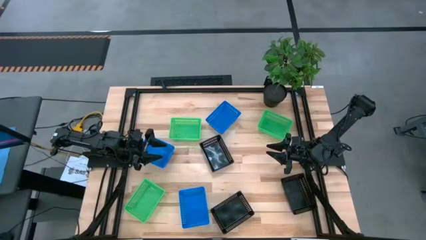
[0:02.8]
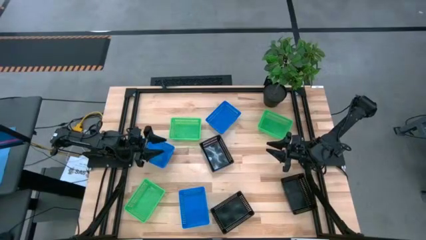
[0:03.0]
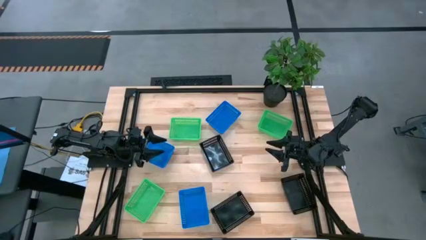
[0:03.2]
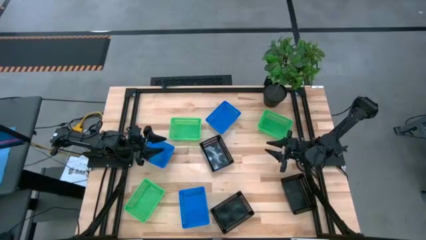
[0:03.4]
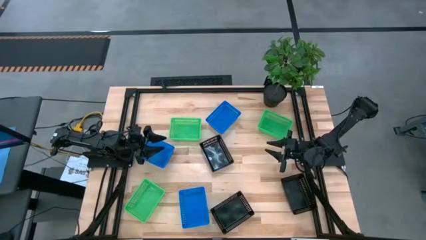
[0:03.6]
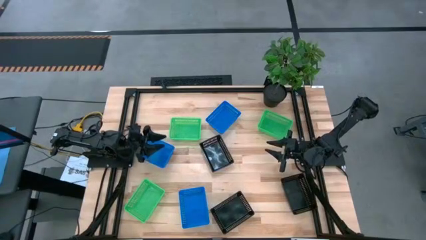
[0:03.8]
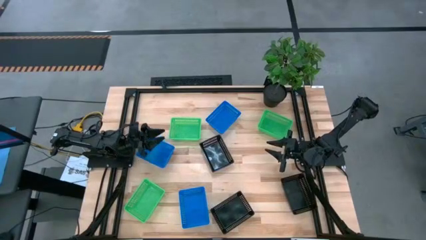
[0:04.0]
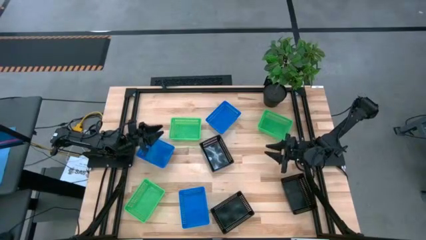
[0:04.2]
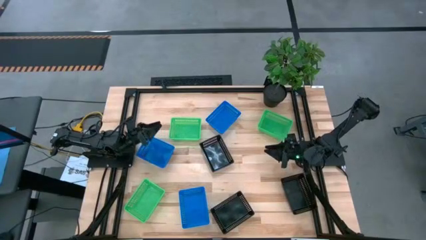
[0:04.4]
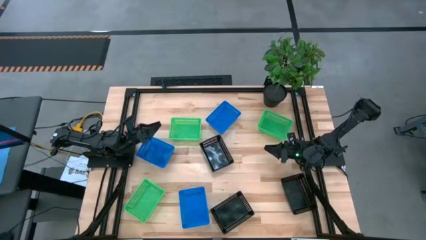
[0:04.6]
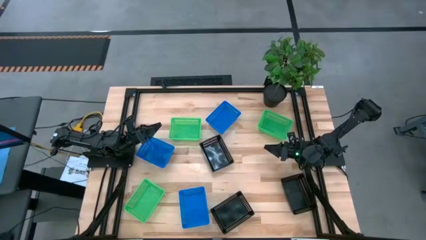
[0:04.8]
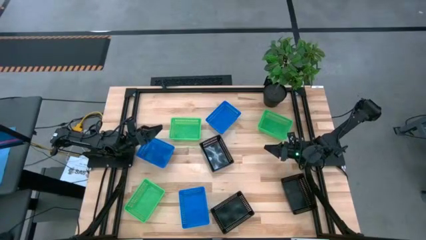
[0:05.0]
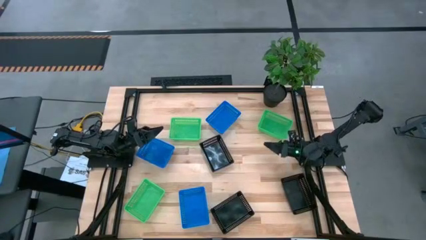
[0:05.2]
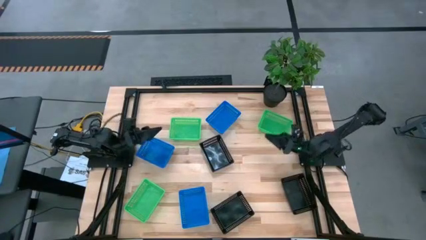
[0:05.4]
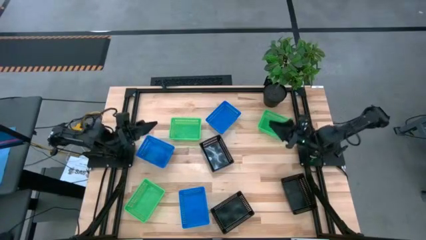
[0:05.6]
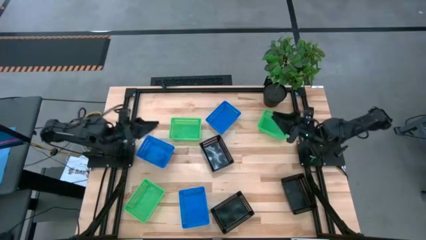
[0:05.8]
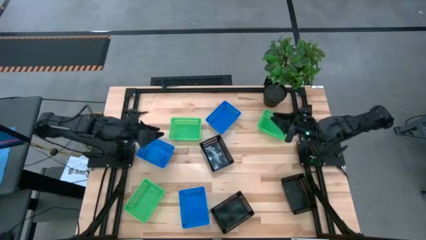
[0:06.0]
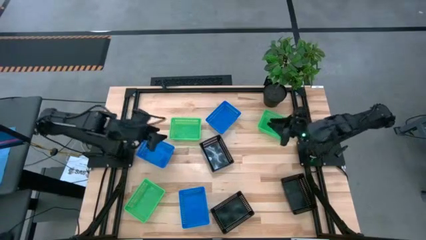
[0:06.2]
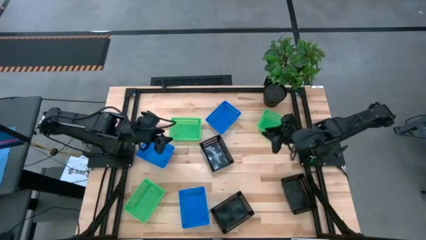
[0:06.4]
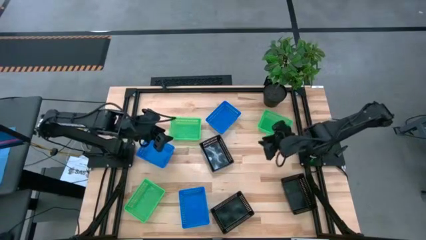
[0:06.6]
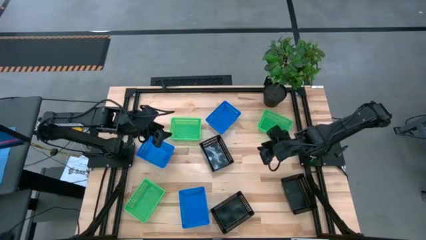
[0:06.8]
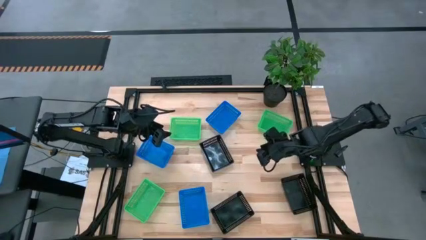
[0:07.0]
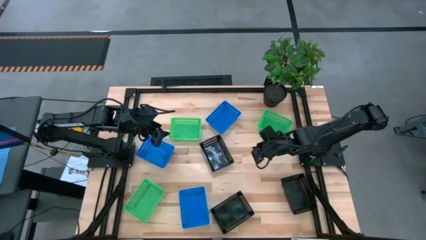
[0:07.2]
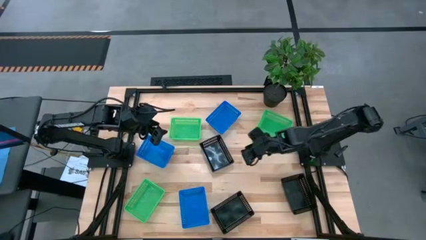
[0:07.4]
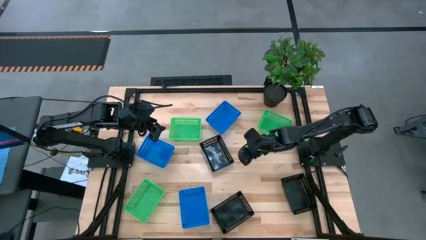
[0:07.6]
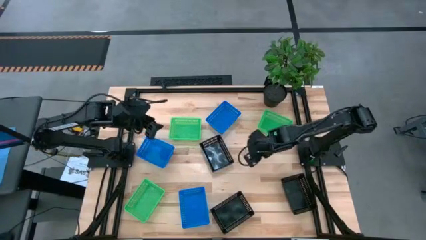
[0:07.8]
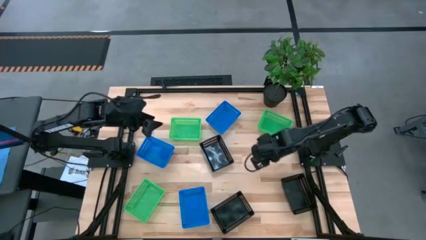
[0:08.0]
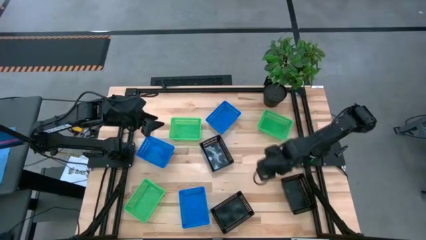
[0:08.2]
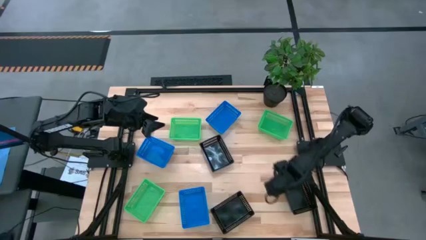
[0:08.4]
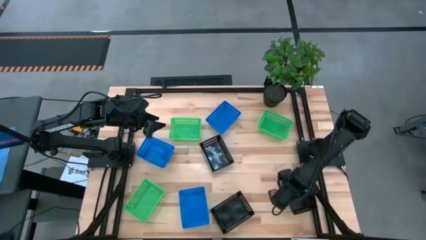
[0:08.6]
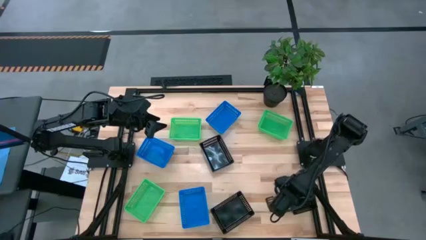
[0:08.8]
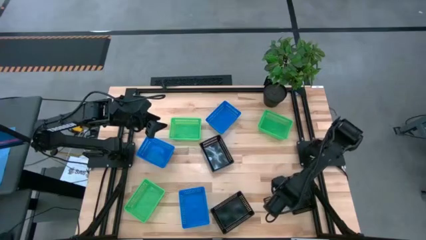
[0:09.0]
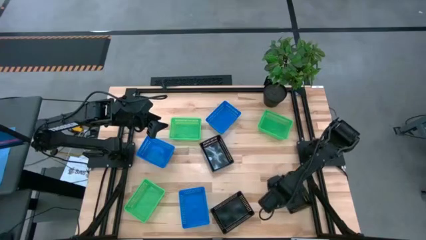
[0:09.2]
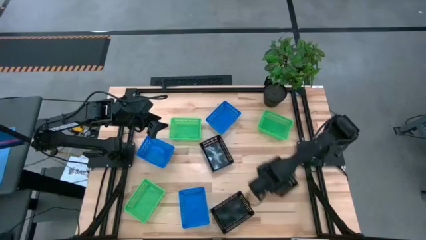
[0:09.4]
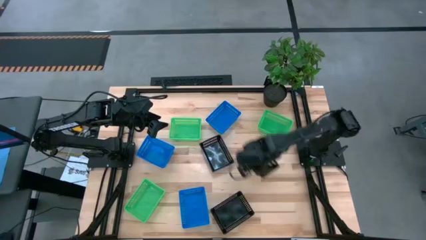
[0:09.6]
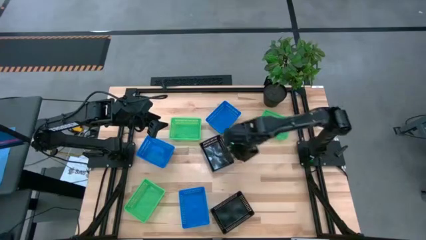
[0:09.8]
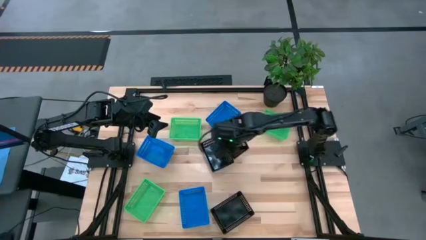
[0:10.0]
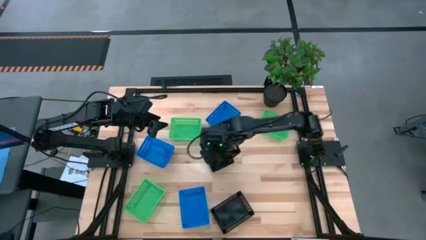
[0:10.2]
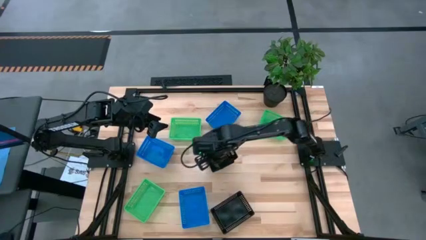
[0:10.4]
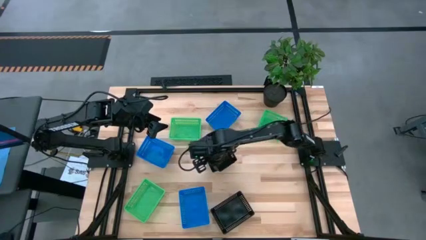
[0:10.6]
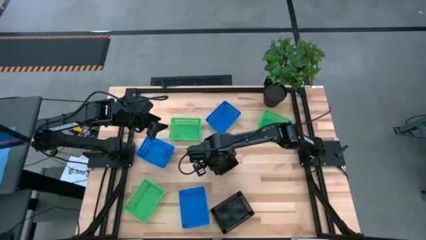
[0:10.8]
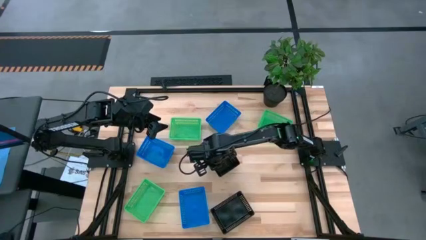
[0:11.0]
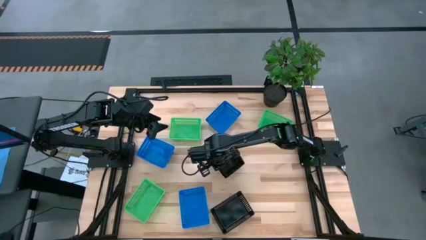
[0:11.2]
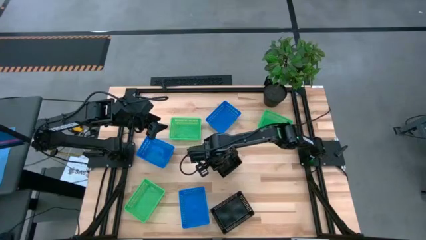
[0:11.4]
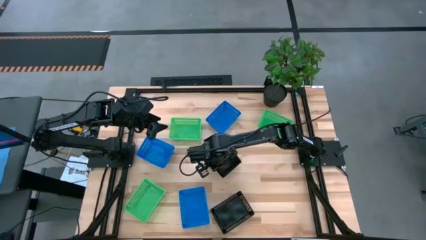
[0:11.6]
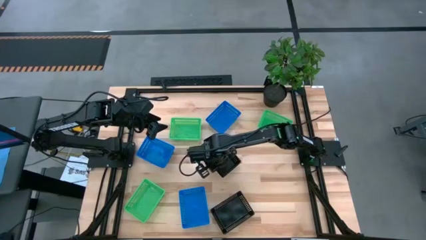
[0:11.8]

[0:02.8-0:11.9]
Stack the bottom right black bin on the top black bin

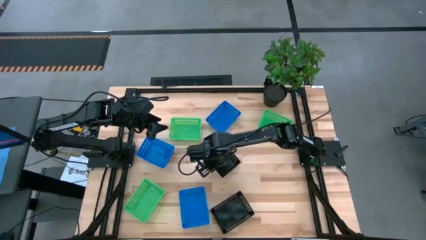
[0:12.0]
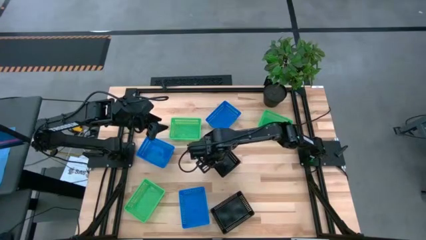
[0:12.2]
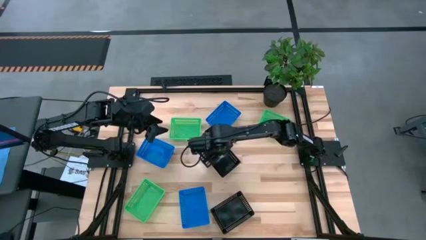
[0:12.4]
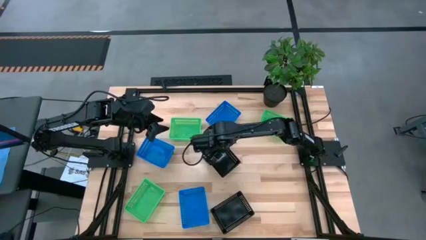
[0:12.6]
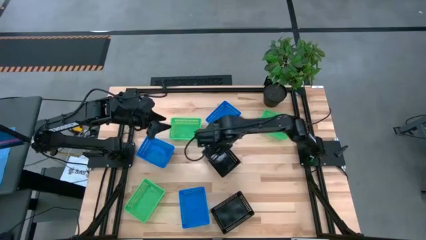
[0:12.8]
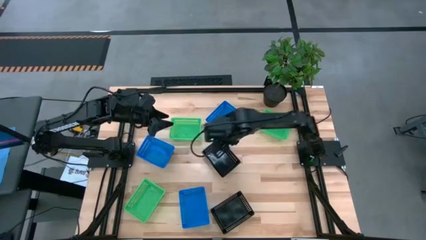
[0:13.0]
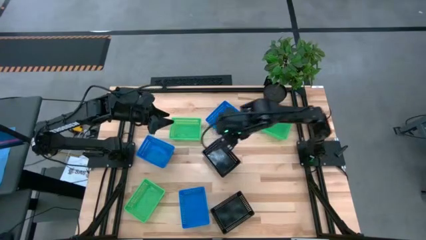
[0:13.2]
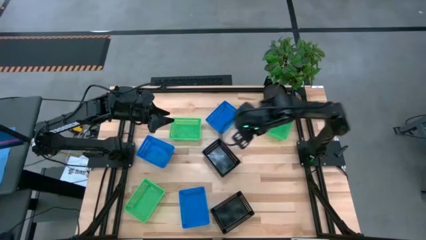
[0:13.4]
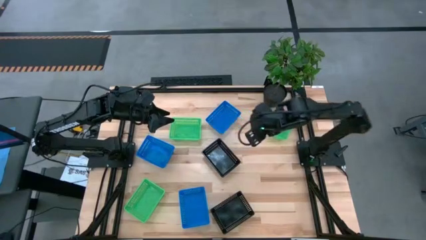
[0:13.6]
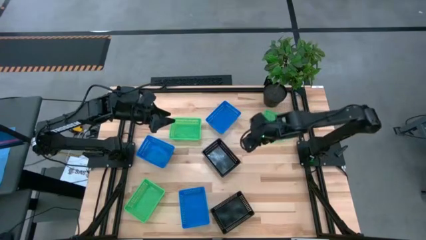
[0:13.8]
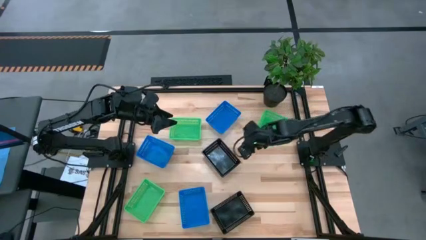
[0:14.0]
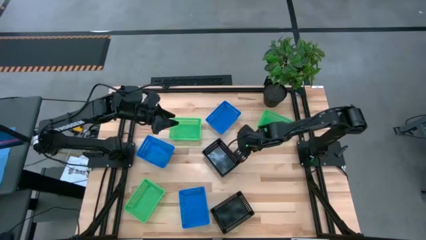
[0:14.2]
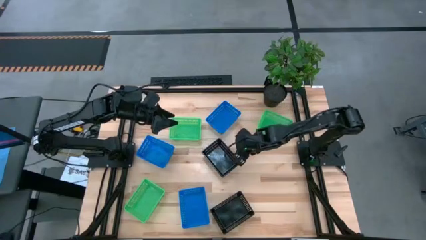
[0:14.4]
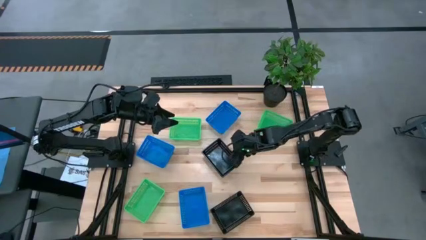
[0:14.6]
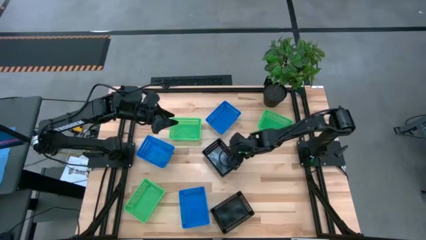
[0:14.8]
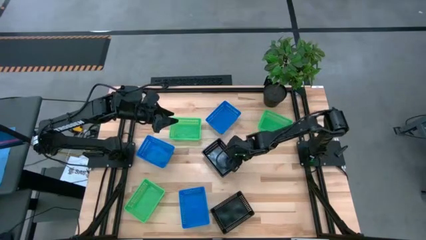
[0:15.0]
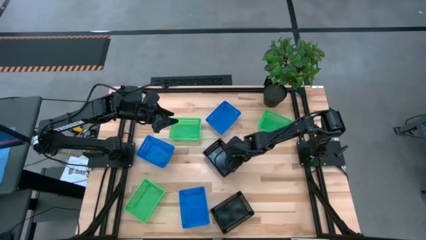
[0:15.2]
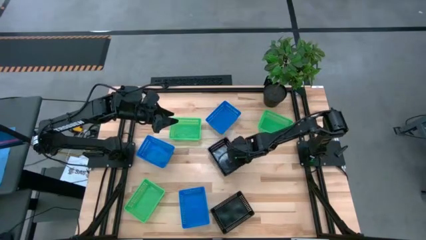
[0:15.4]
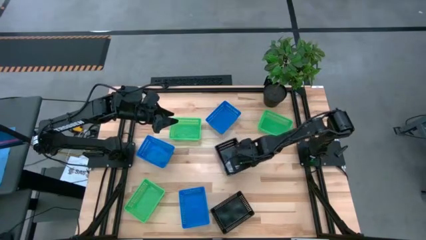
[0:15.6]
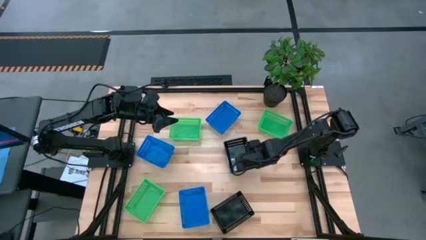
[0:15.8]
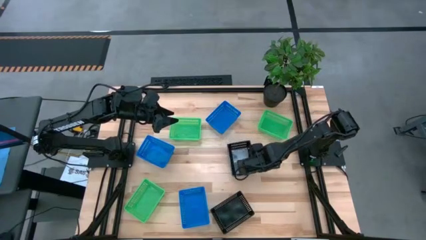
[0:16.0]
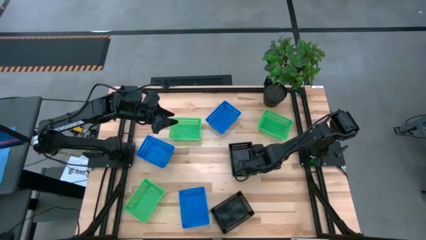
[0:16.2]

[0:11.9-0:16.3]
Move the black stacked bins slightly to the right on the table

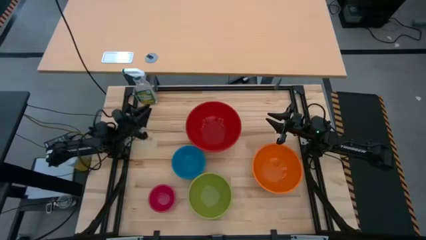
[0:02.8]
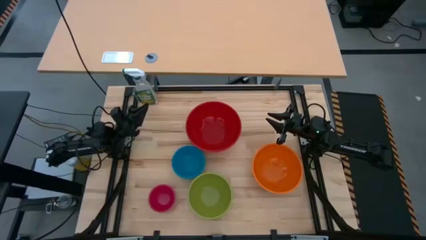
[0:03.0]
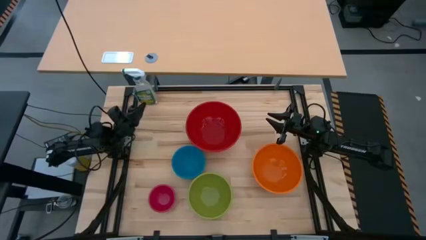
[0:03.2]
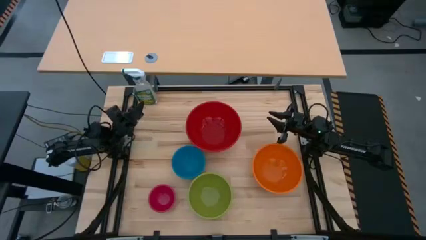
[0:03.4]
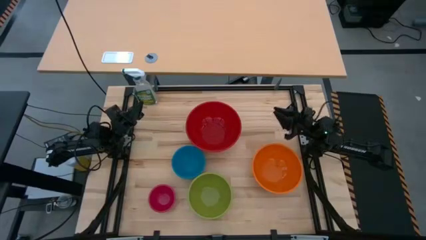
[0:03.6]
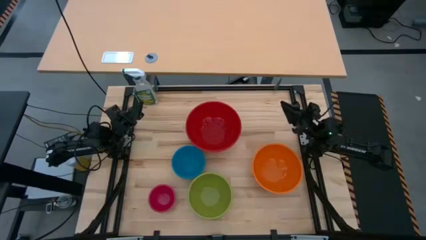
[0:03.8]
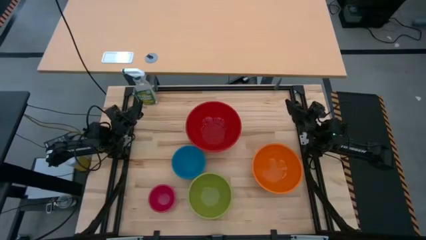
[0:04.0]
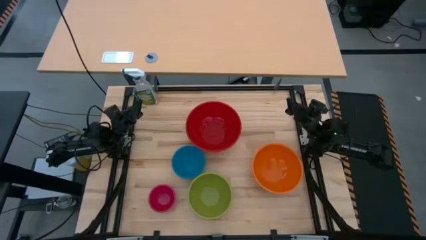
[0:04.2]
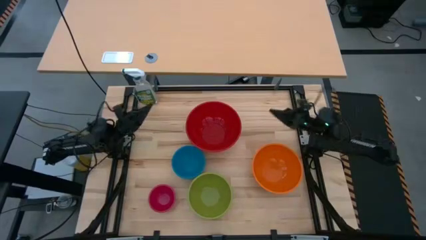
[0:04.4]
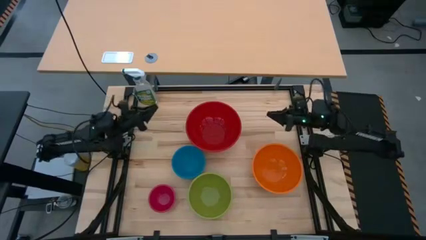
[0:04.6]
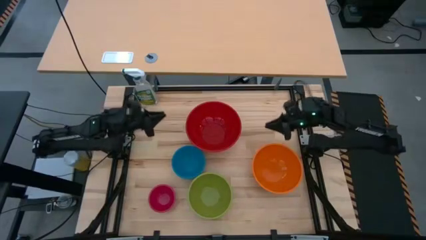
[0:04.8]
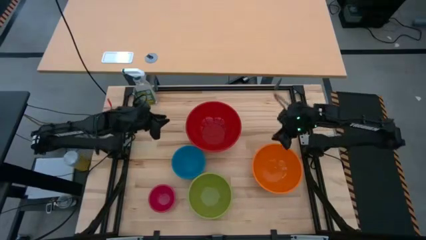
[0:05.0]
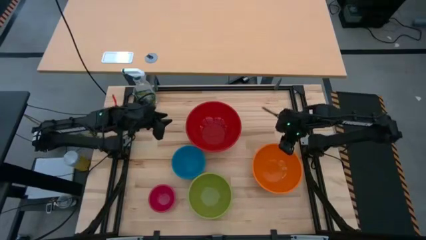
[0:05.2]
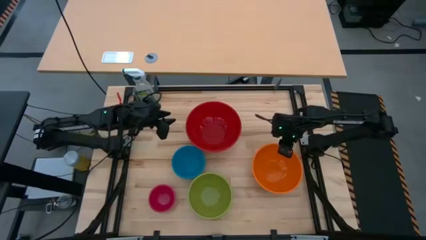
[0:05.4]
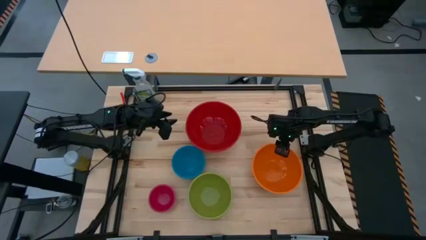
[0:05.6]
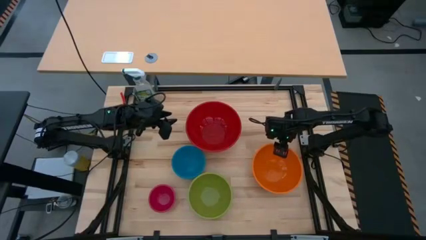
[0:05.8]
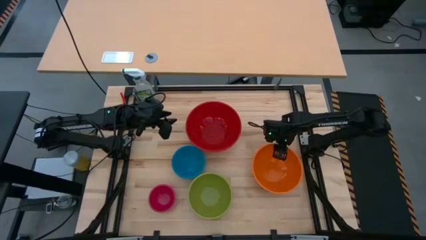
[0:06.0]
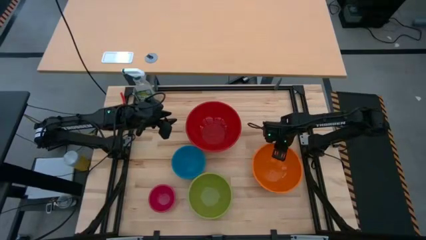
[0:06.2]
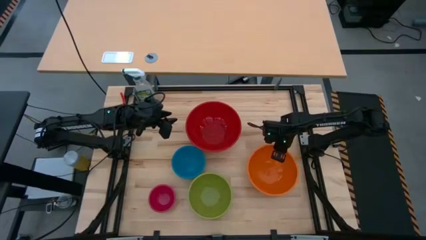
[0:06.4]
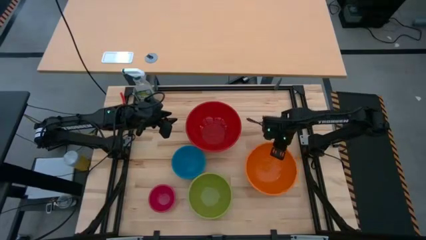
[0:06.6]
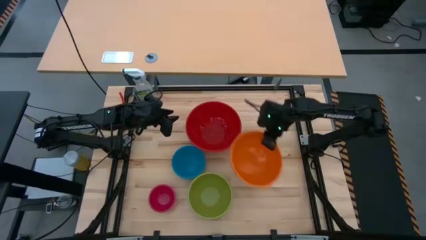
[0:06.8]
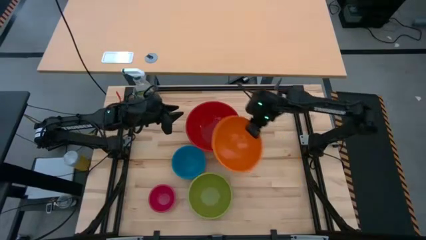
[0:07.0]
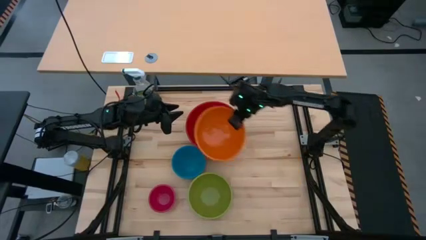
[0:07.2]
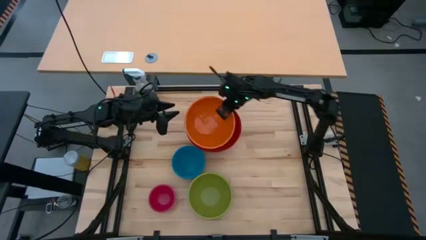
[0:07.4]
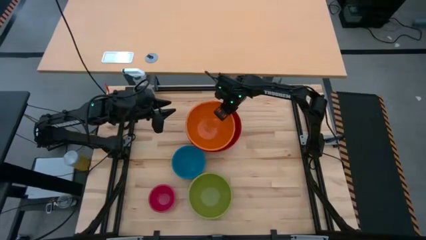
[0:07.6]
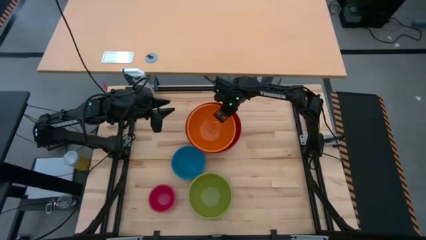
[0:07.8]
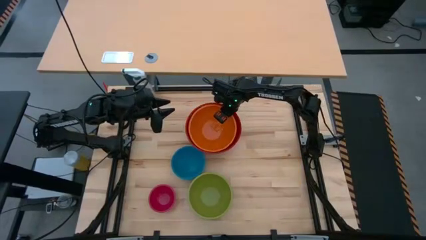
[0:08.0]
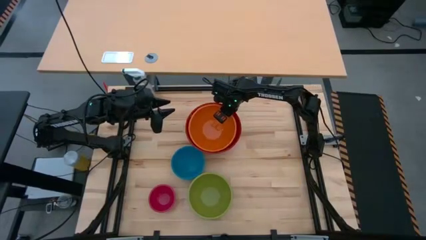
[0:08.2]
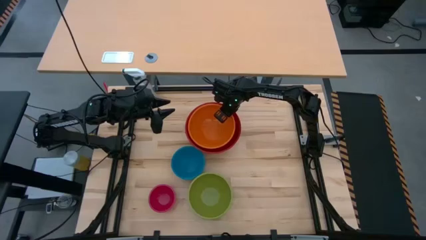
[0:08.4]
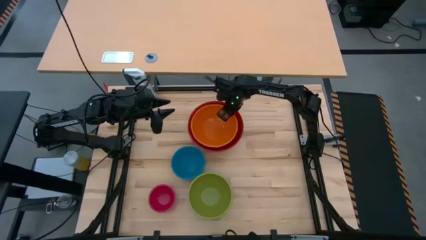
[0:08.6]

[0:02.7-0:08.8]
Stack the orange bowl on the red bowl
